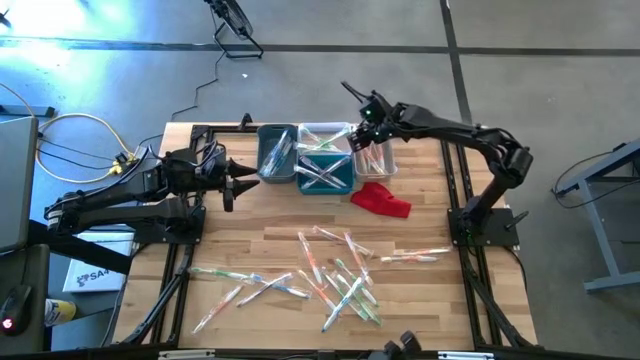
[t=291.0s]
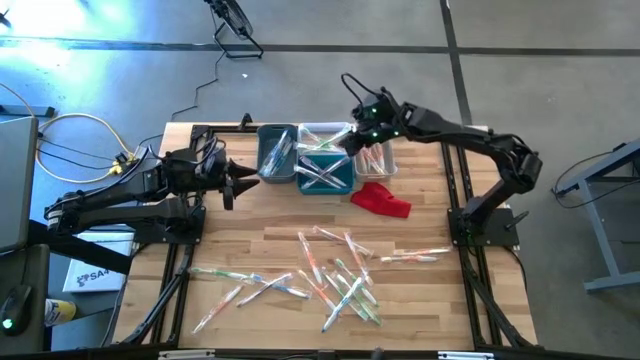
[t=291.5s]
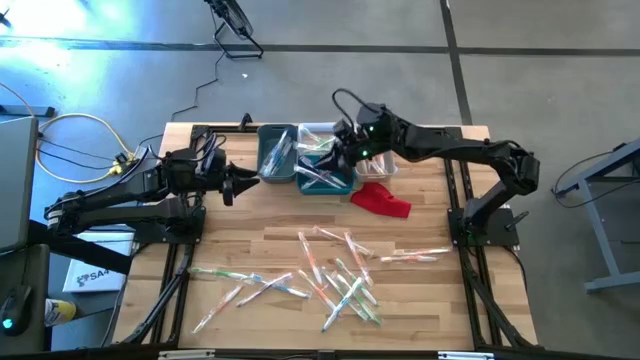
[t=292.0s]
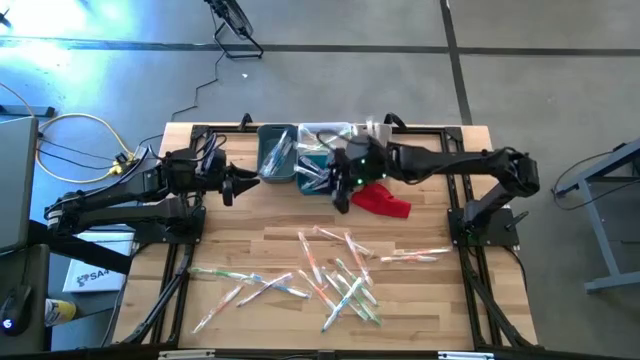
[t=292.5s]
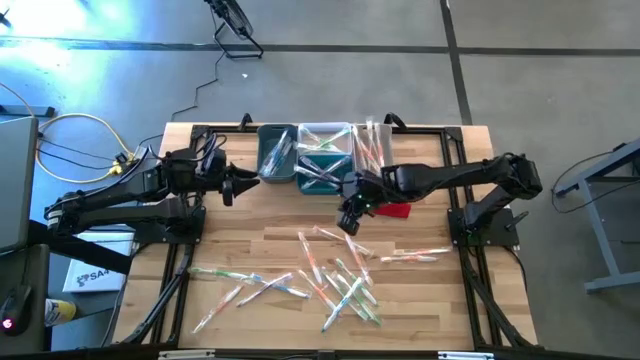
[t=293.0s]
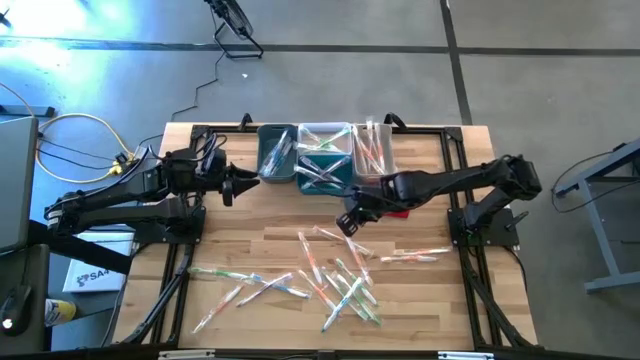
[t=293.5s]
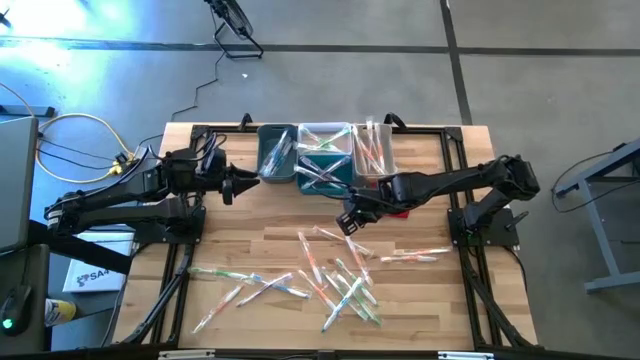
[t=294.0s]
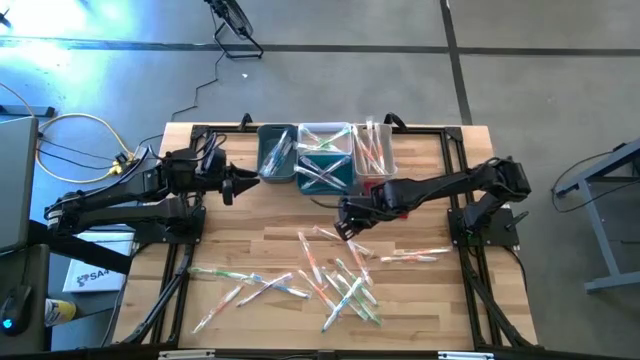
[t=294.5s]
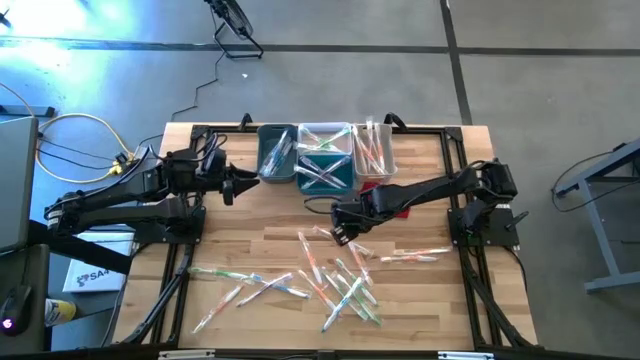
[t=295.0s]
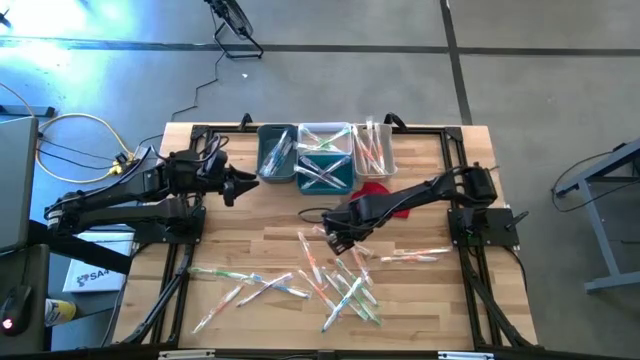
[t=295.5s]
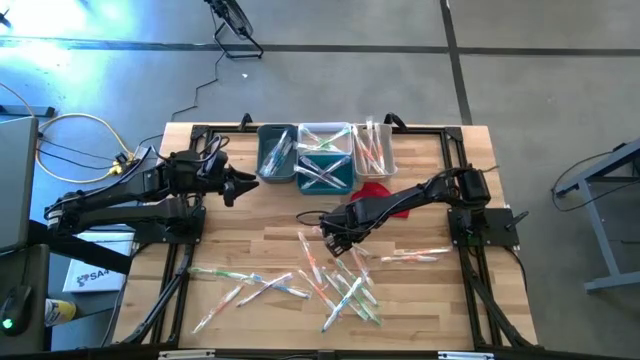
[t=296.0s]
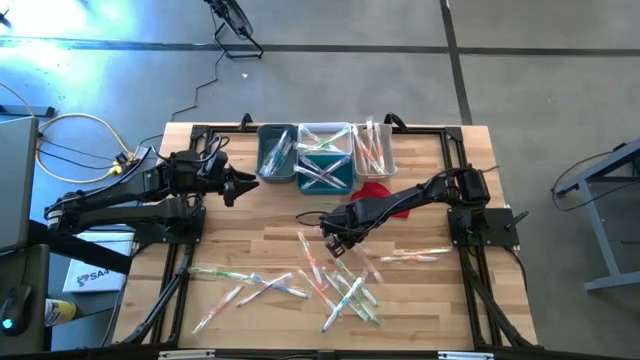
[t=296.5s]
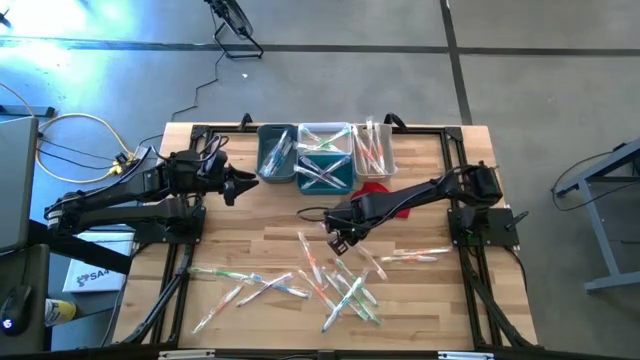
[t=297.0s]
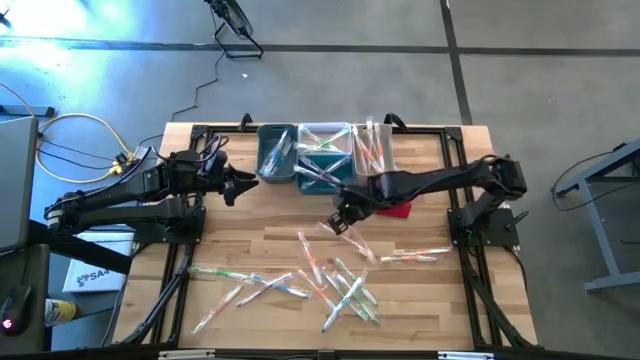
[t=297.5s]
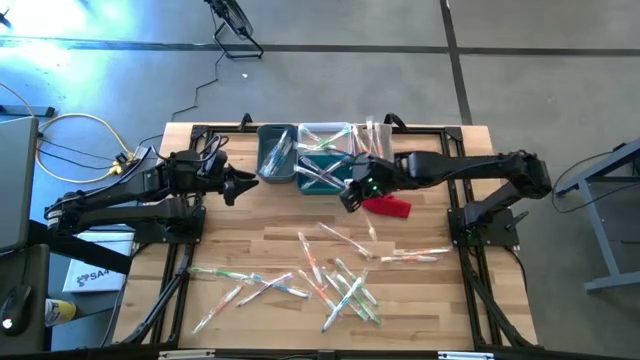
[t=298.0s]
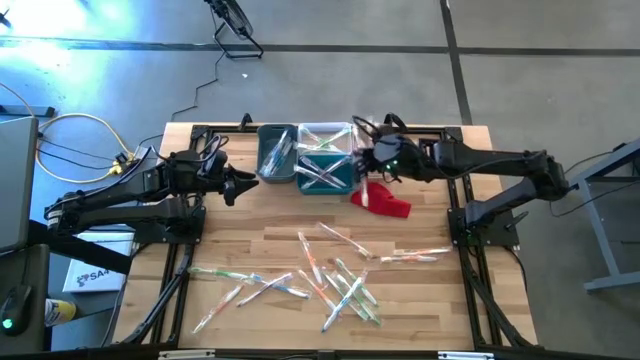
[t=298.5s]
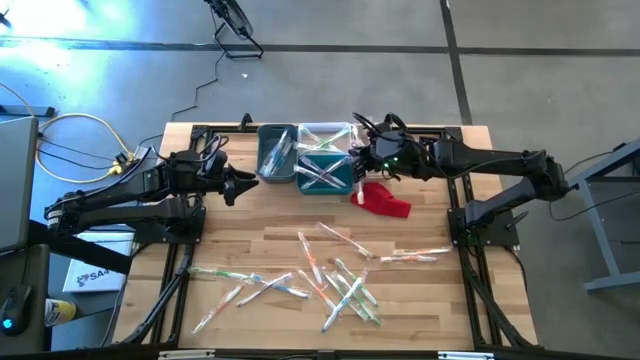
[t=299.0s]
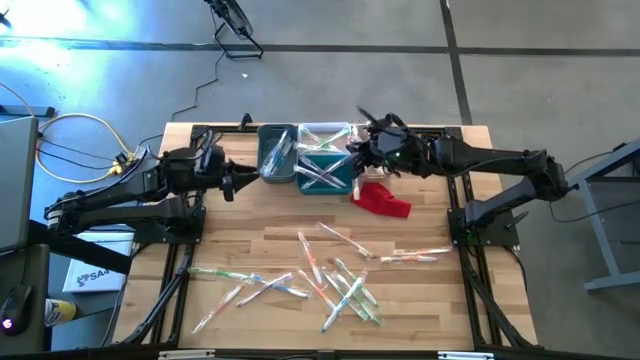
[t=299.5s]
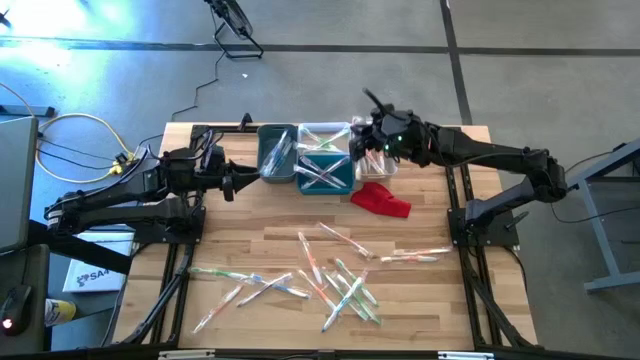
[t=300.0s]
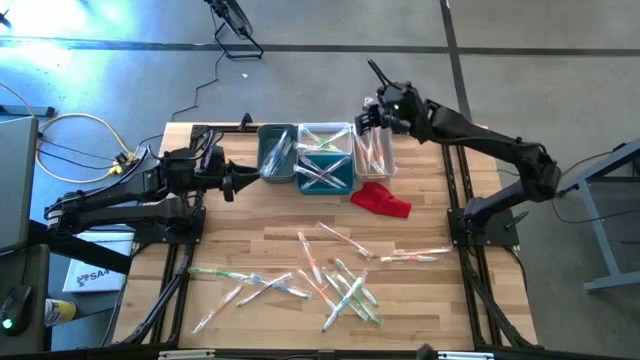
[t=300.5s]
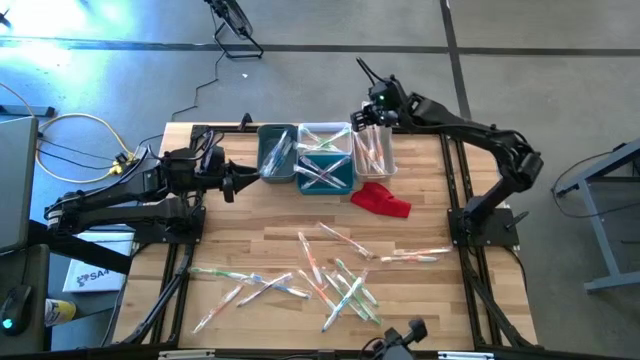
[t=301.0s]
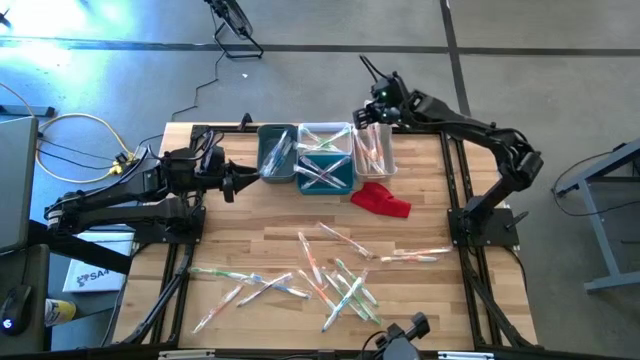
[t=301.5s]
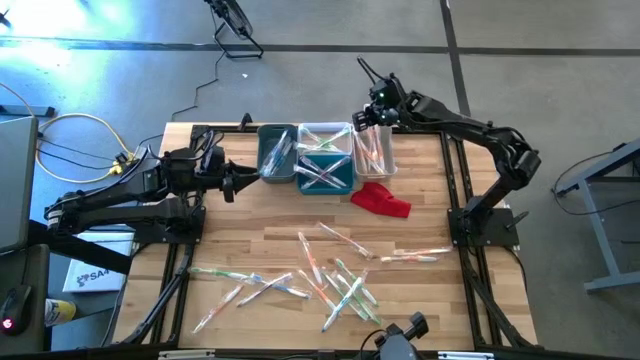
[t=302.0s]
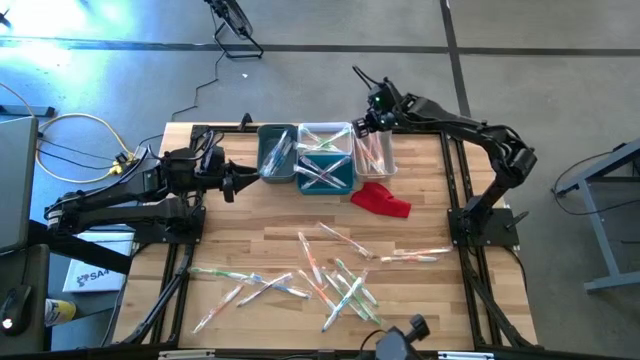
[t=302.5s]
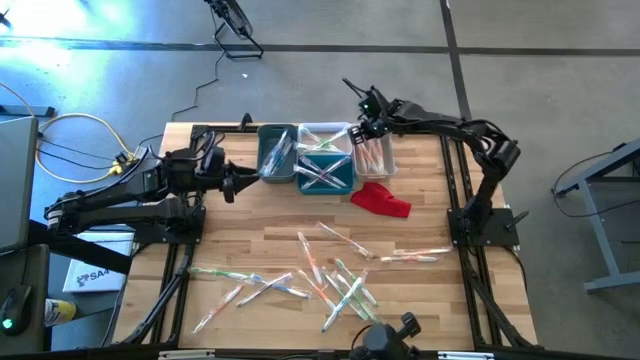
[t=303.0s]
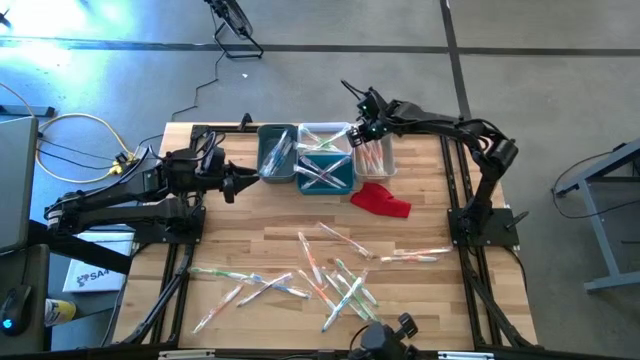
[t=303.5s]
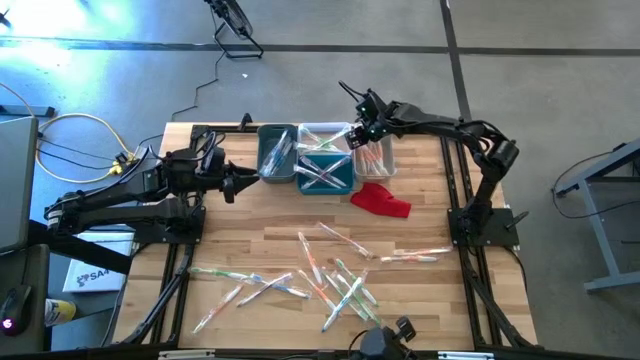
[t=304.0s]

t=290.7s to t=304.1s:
Task: Pick & Place Toothbrushes
Put the orange toothbrush into the white bin

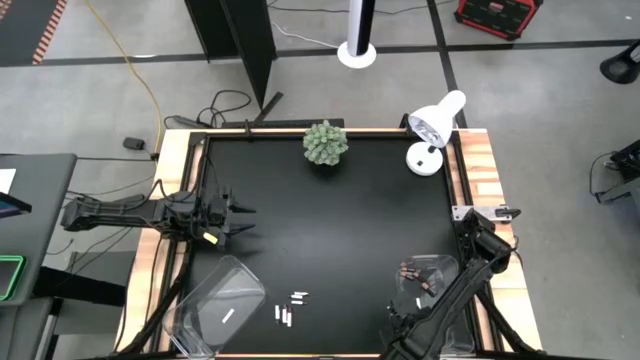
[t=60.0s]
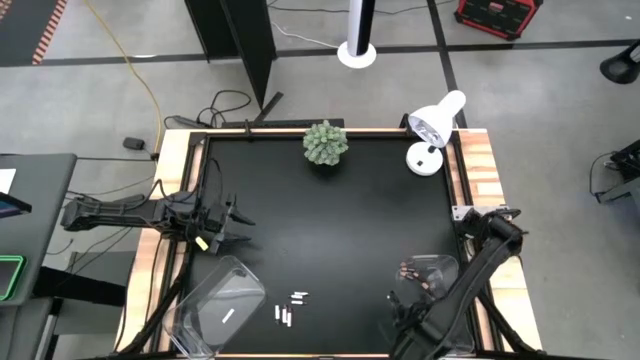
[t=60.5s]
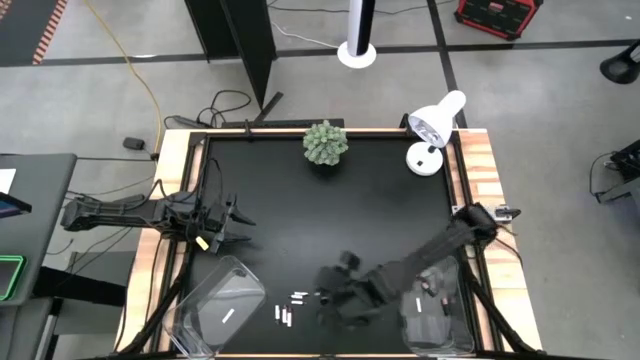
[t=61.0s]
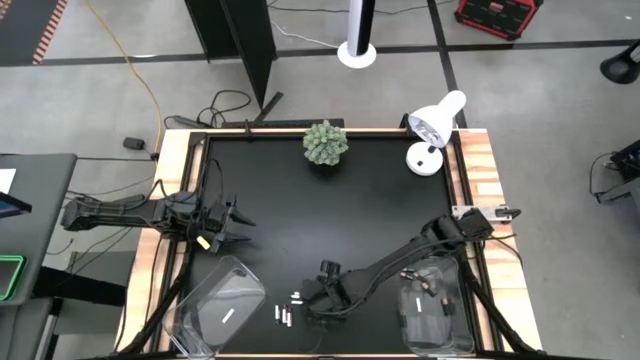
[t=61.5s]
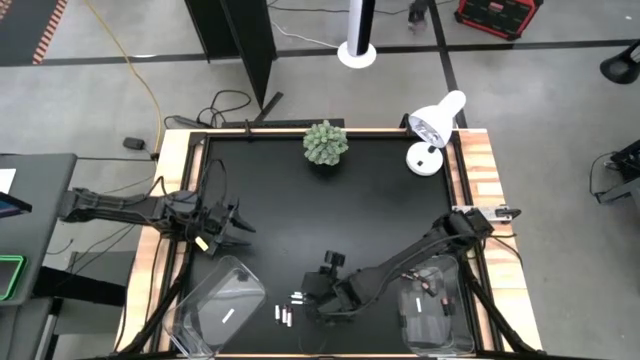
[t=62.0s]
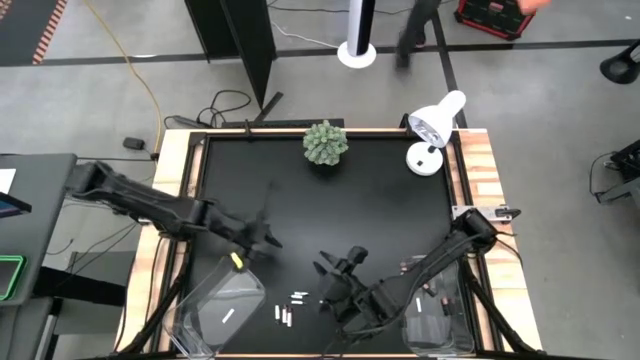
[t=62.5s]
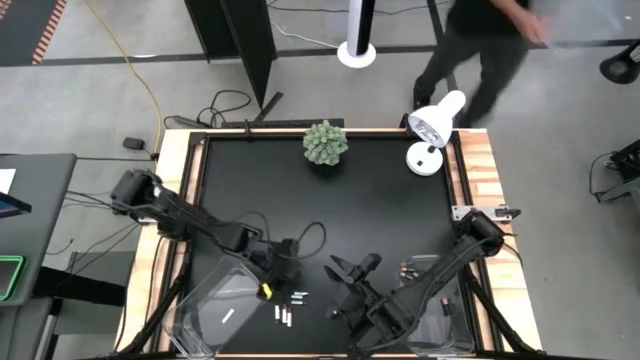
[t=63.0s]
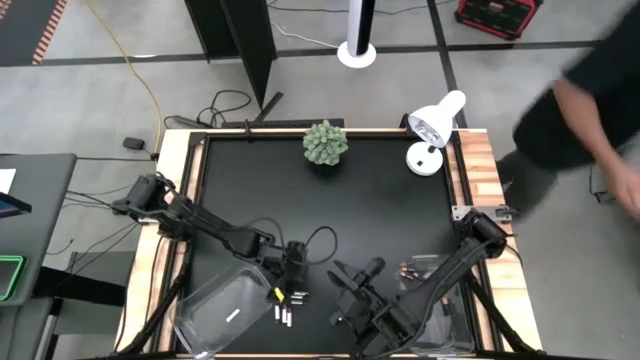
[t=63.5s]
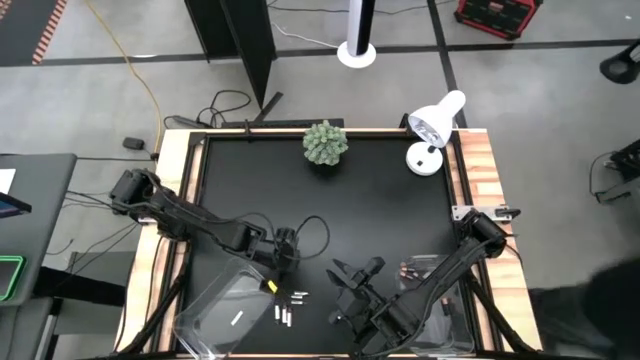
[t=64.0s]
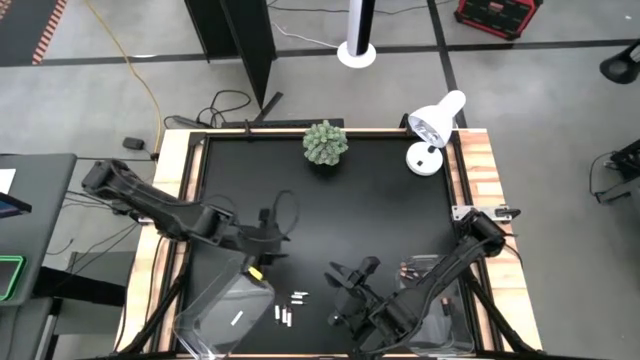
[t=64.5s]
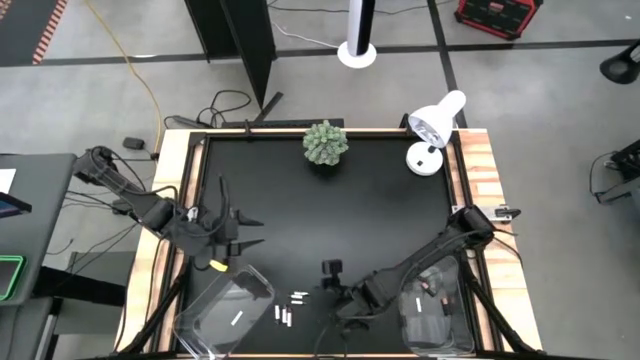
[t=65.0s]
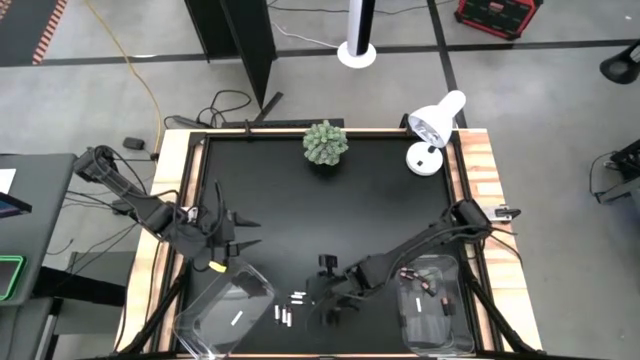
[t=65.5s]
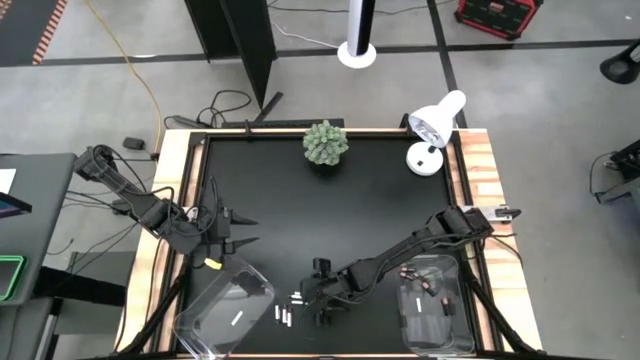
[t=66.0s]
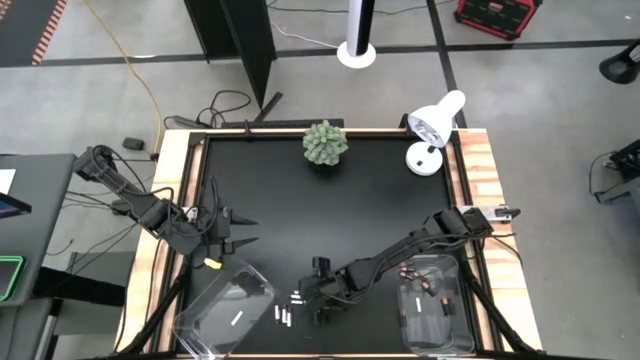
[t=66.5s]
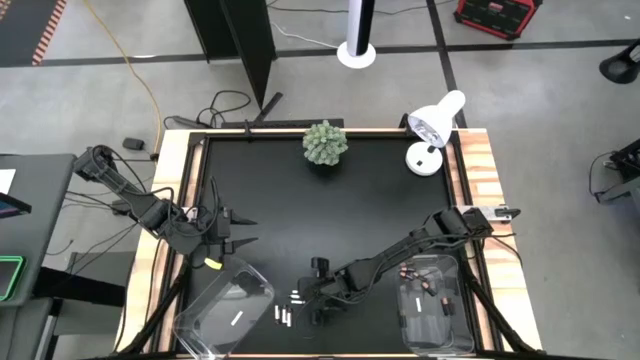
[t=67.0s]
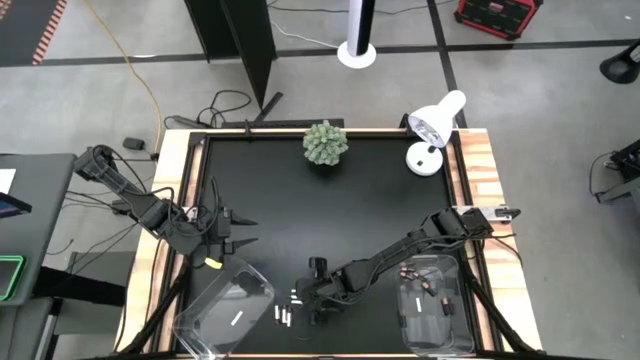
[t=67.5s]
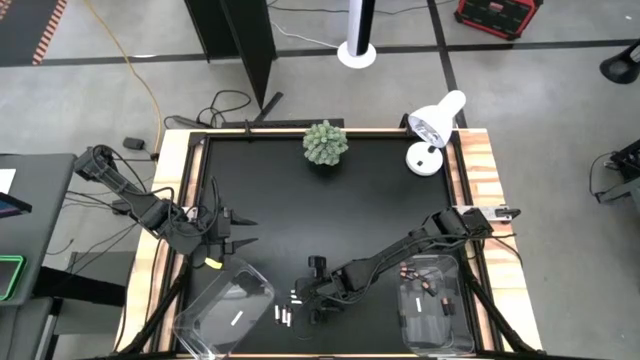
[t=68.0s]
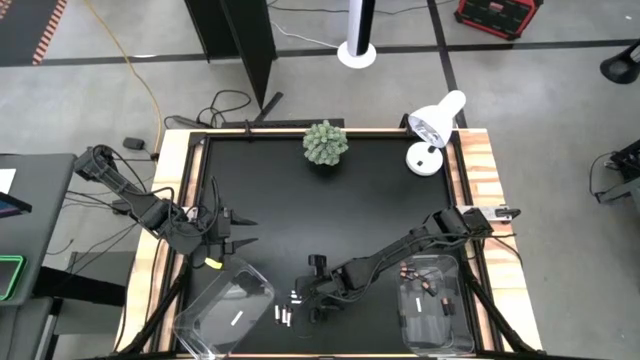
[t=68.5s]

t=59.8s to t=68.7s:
Task: Sort batteries
Put the silver battery into the left transparent bin
